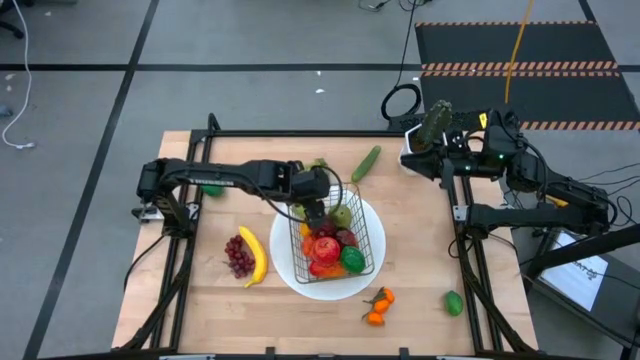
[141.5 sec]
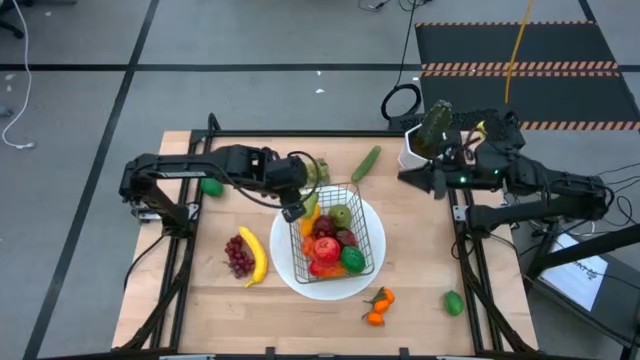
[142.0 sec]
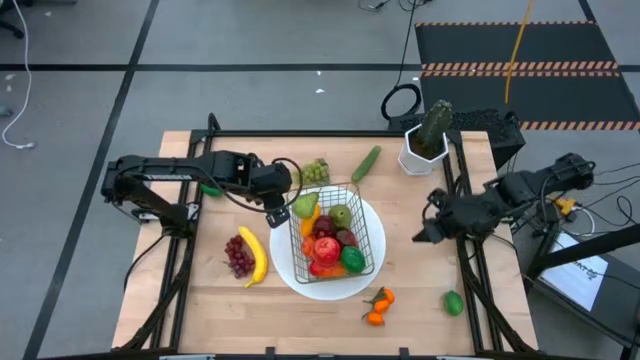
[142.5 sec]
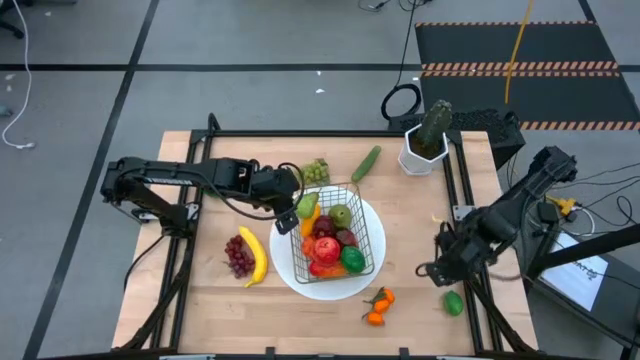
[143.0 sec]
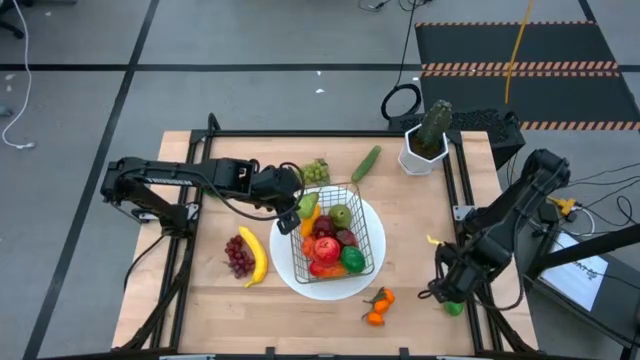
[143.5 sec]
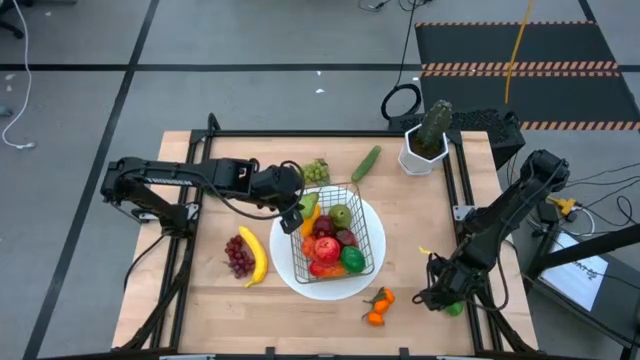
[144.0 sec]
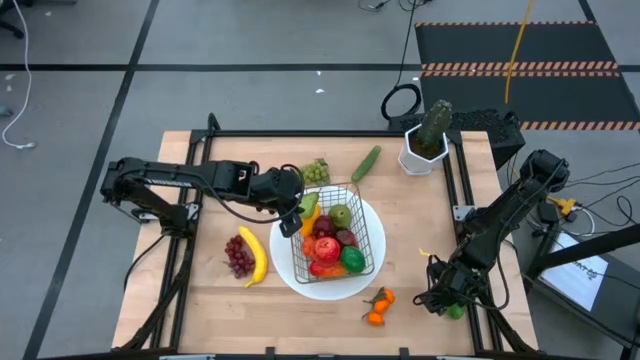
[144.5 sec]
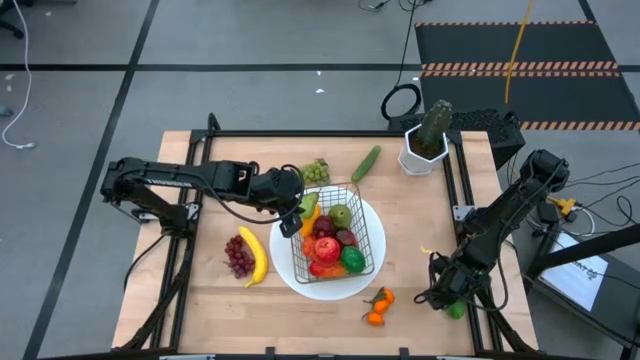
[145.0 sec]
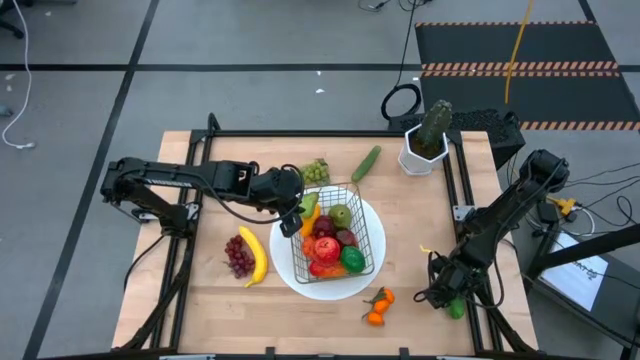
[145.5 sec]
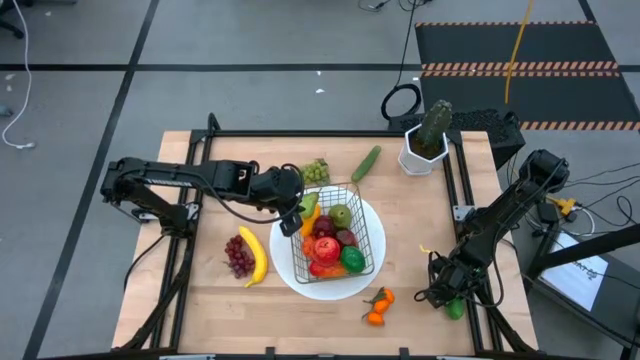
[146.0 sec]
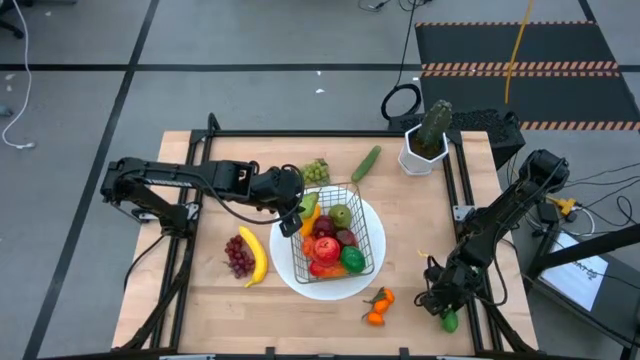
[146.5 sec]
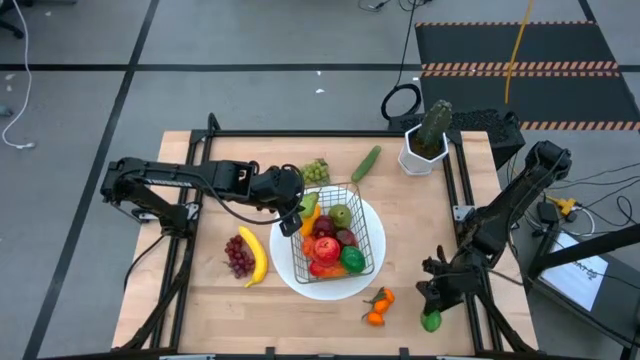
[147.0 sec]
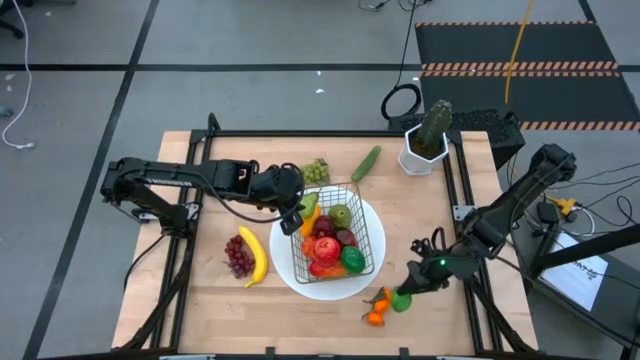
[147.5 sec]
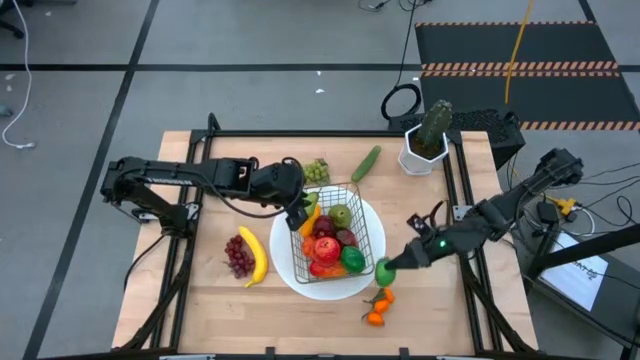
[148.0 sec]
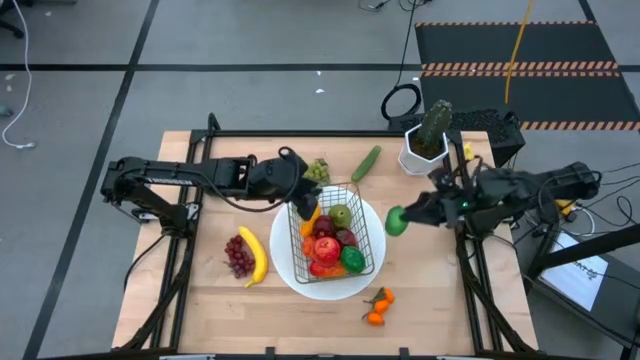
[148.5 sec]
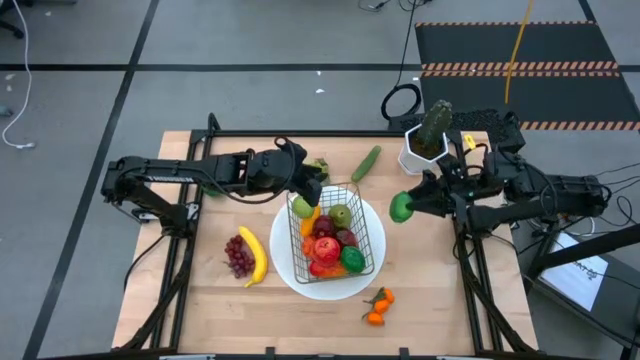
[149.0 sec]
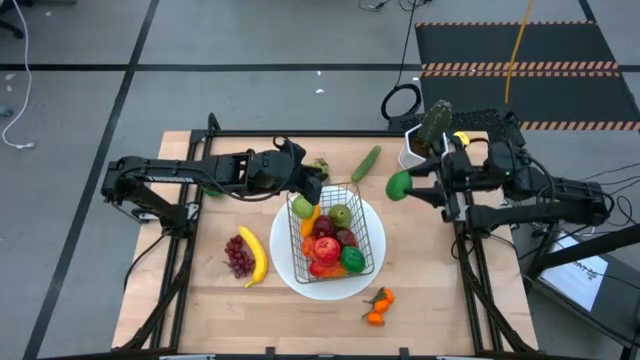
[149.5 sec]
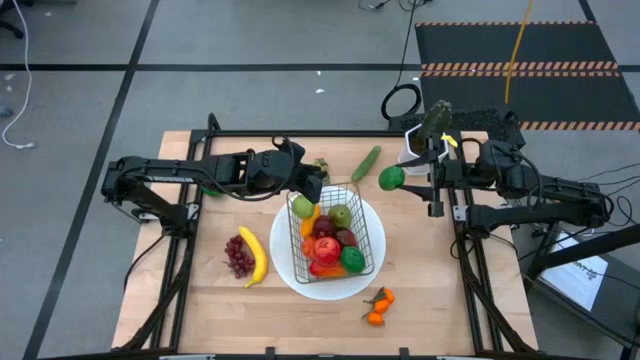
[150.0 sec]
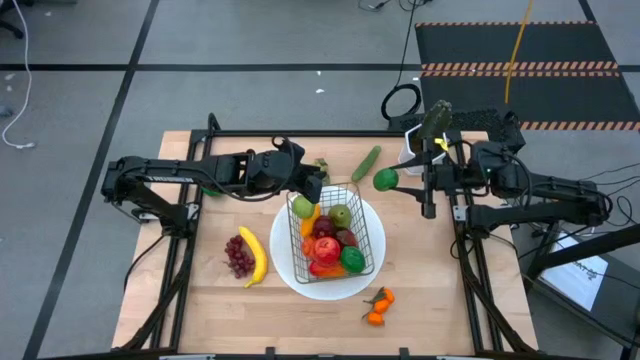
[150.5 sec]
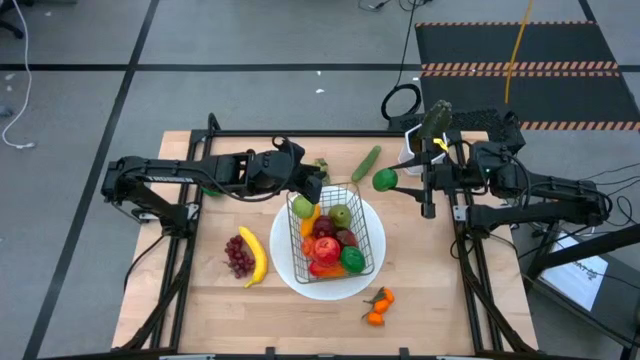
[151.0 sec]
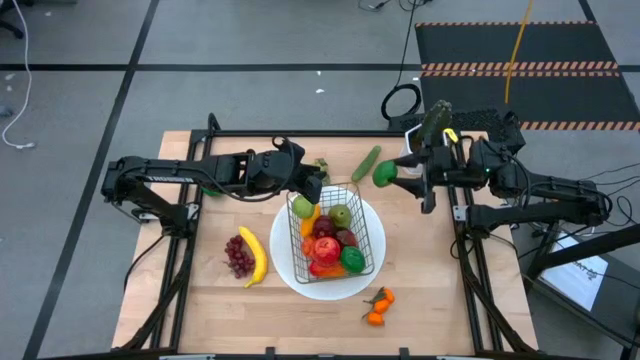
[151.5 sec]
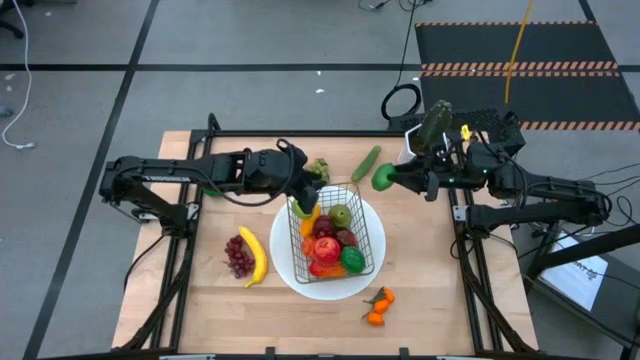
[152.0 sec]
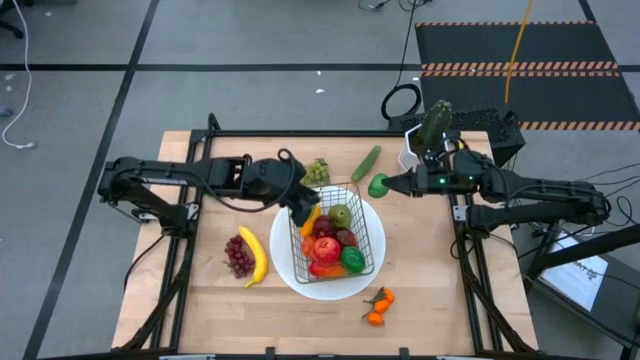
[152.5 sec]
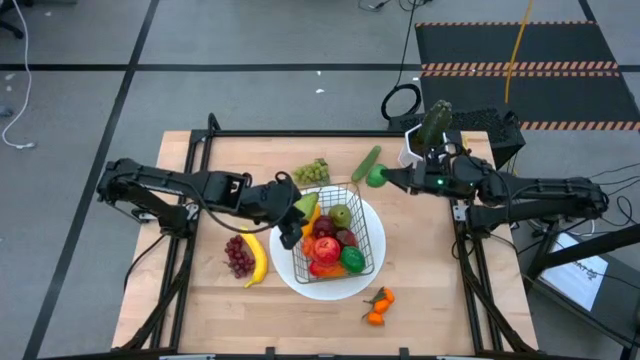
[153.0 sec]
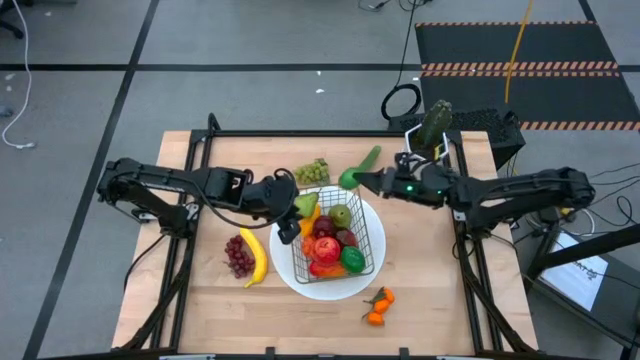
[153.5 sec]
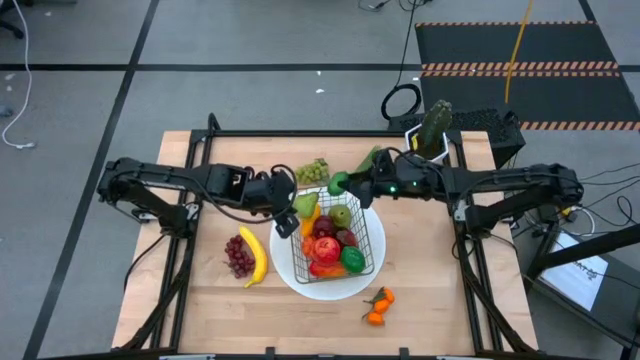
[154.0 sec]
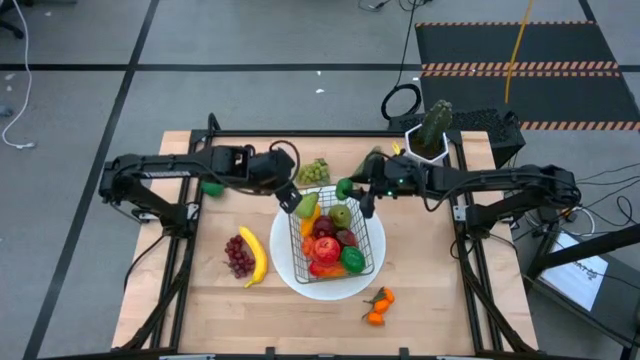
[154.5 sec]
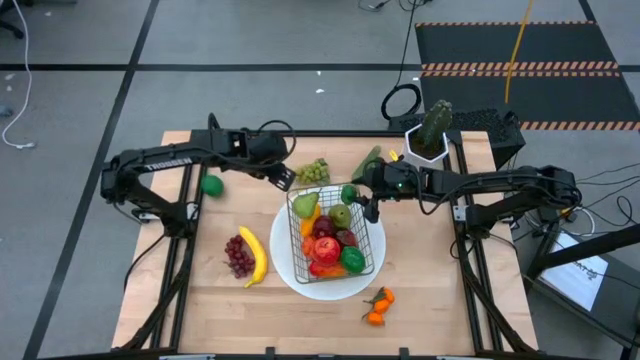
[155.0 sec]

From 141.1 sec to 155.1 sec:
Task: Build produce basket
Put the bottom green lime into the black wire basket

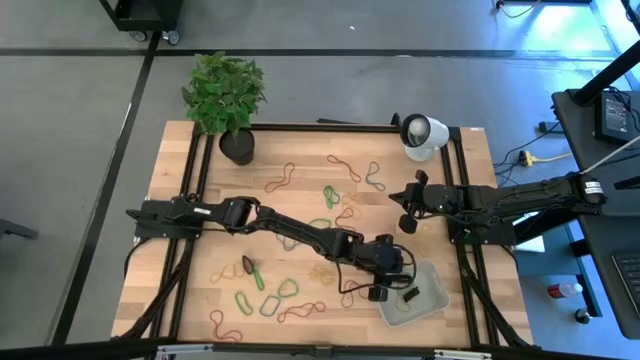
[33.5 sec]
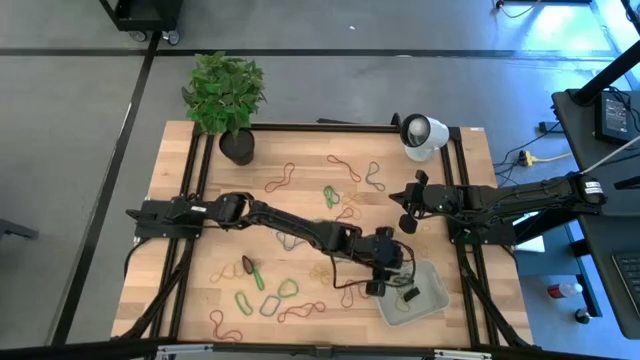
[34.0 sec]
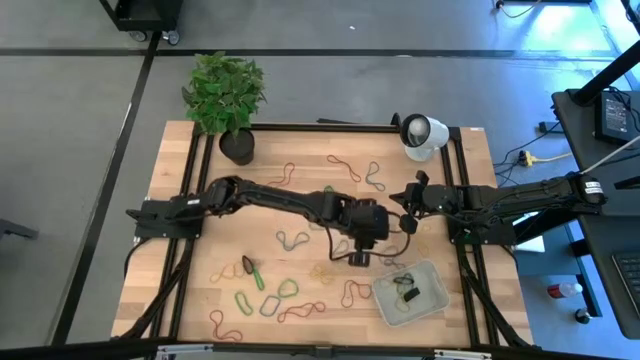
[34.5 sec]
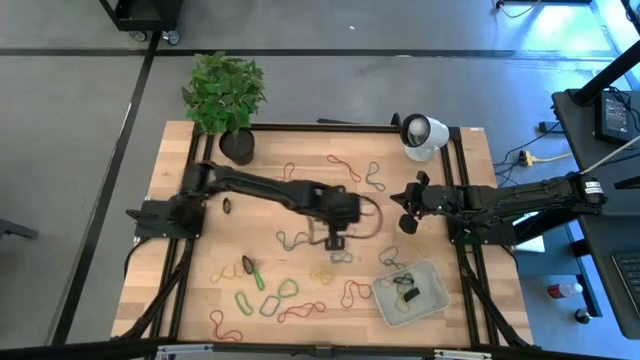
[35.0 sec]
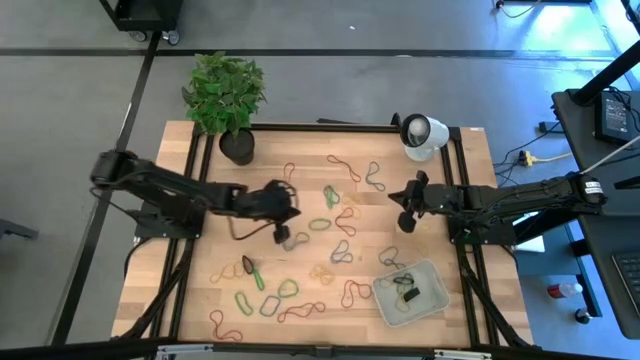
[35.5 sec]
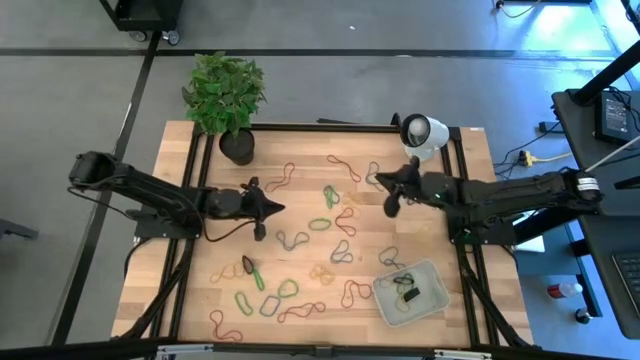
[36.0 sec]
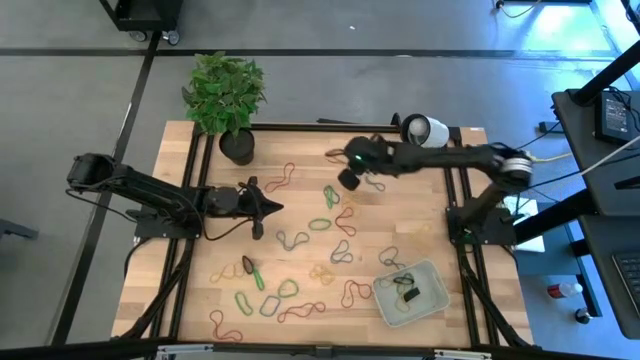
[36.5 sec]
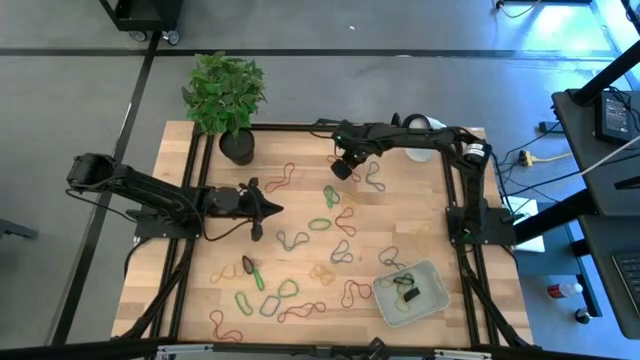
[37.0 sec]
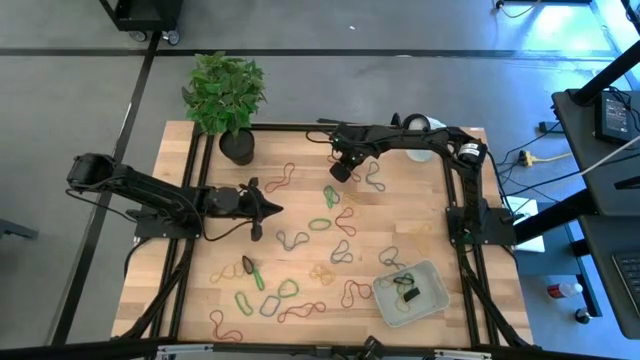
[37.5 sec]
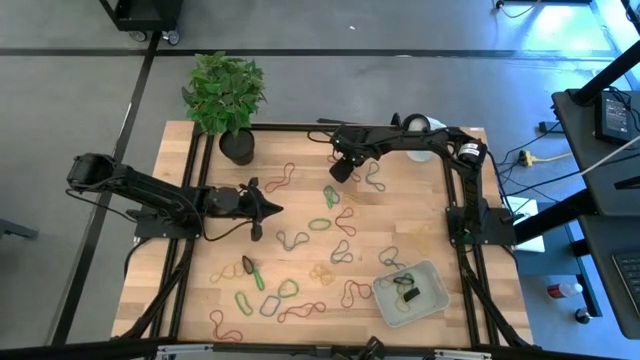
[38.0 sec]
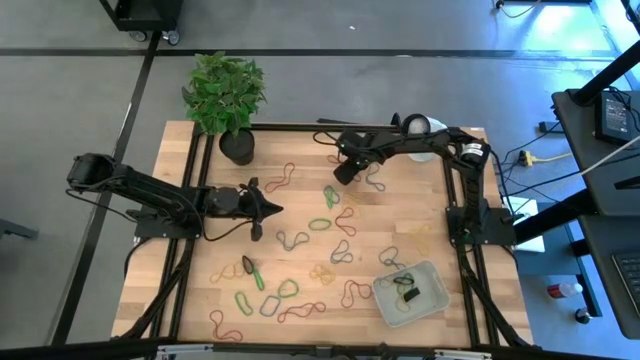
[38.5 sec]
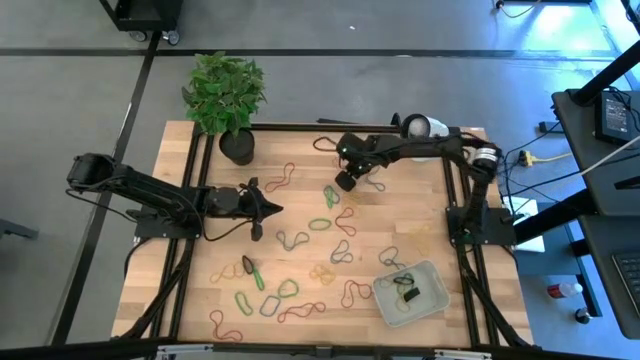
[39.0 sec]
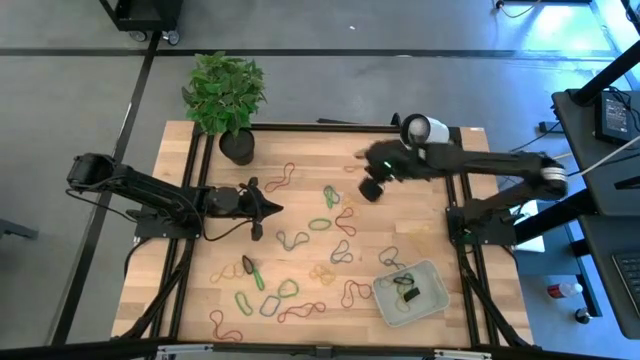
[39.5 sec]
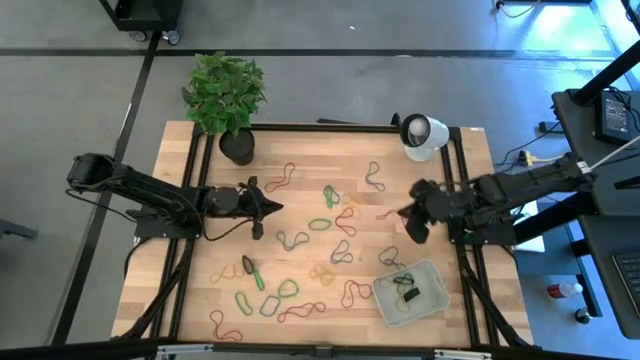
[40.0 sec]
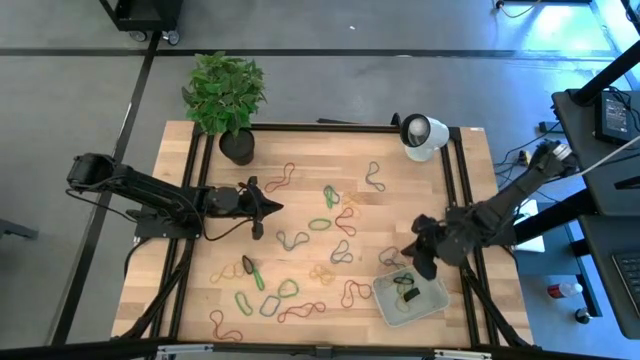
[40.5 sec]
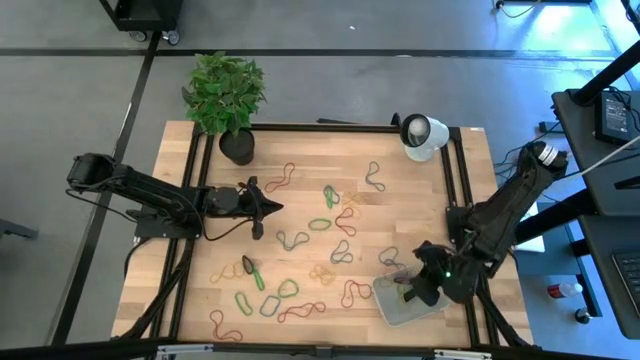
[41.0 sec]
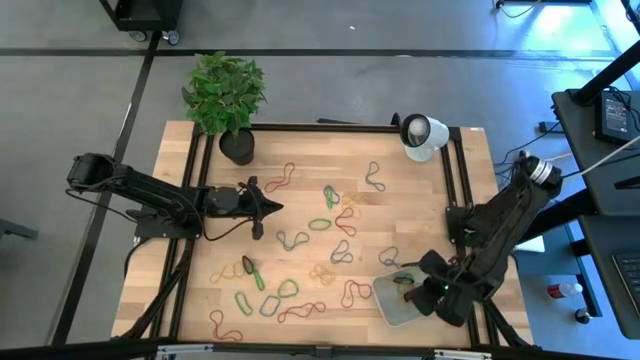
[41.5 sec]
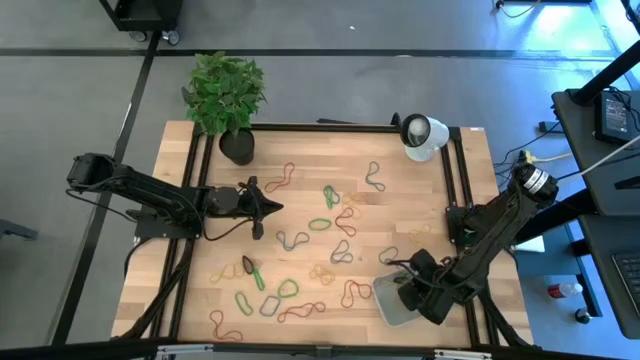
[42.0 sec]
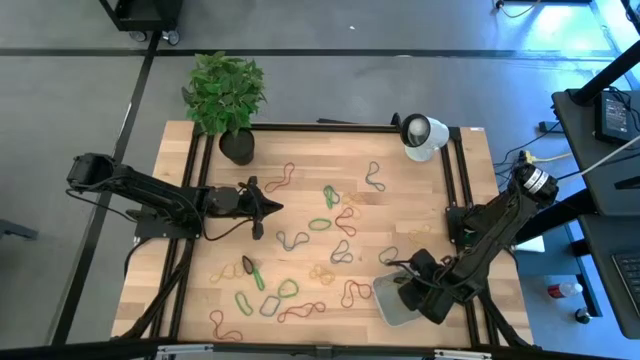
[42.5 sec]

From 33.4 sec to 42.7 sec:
Task: Pick and place rubber bands into bin
Put the red rubber band into the white bin
